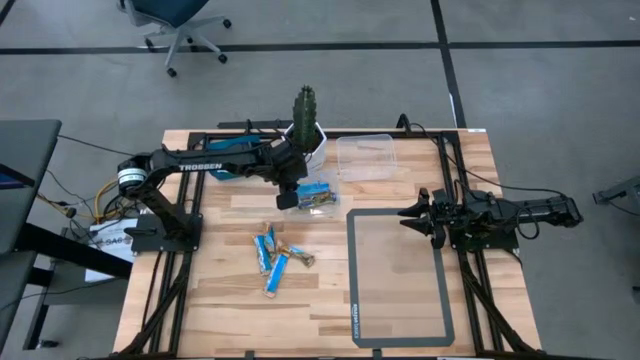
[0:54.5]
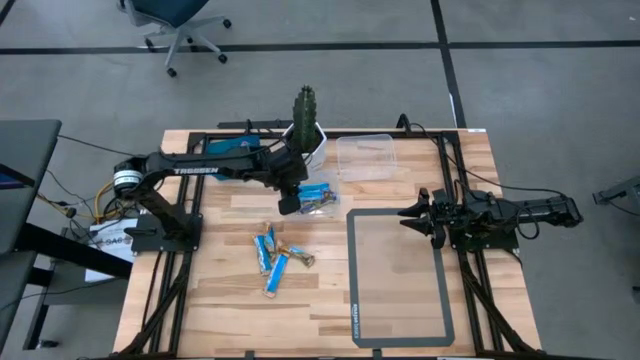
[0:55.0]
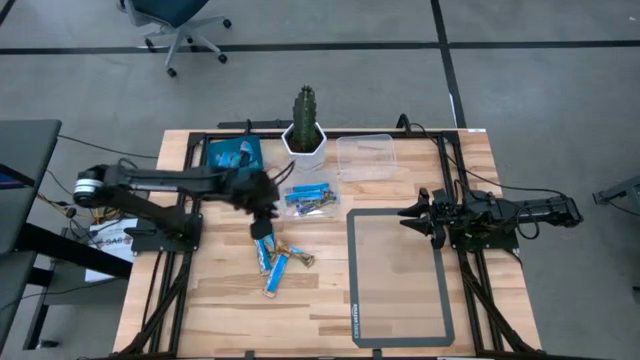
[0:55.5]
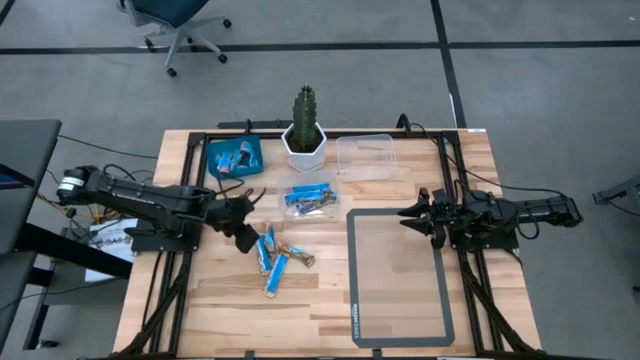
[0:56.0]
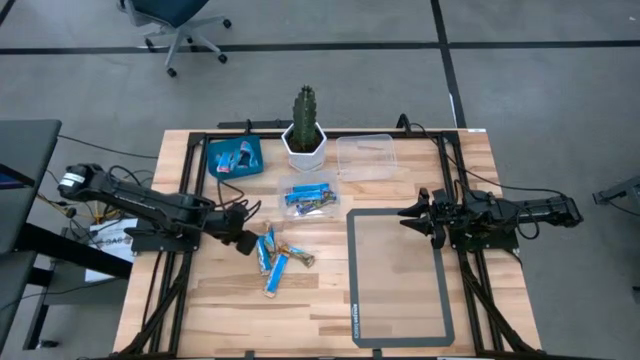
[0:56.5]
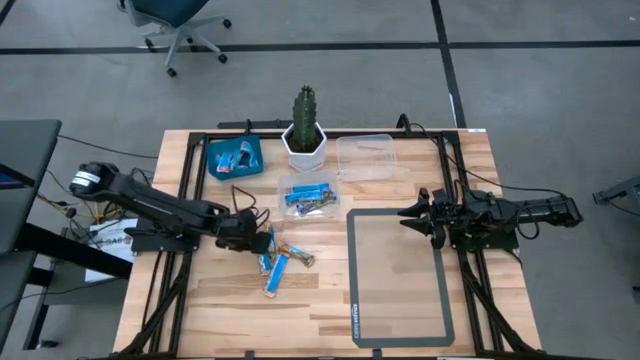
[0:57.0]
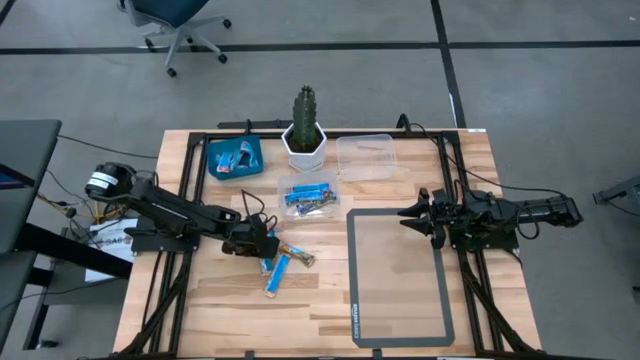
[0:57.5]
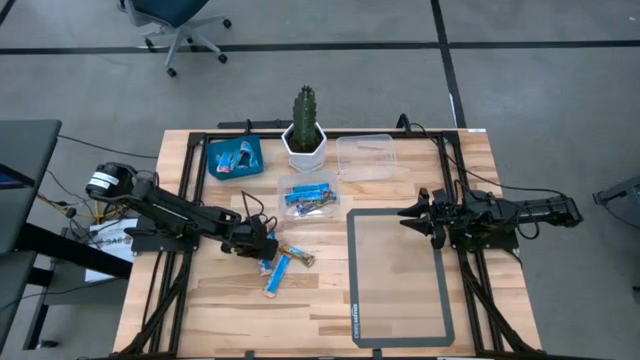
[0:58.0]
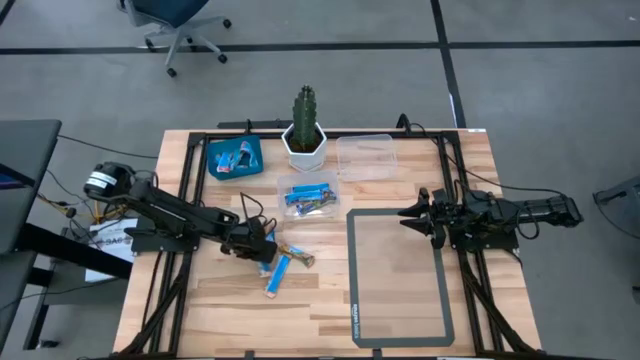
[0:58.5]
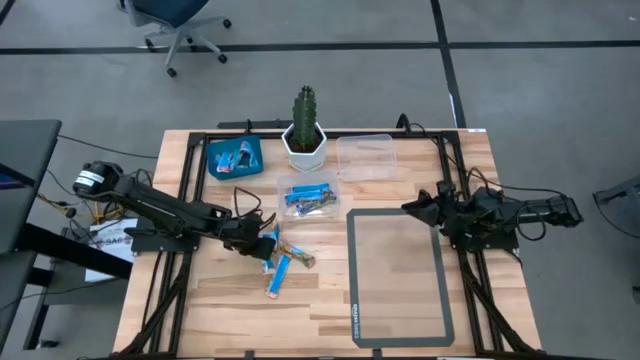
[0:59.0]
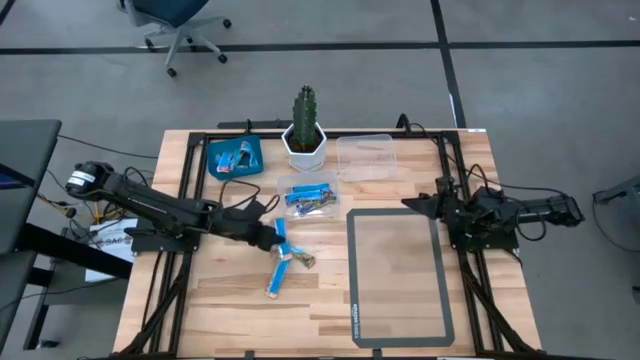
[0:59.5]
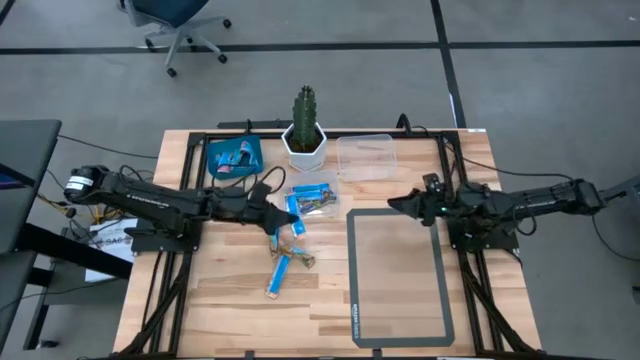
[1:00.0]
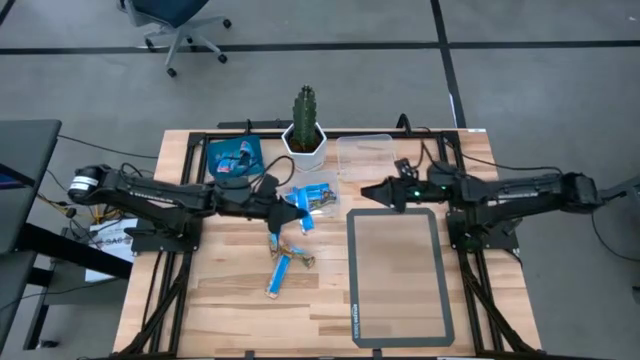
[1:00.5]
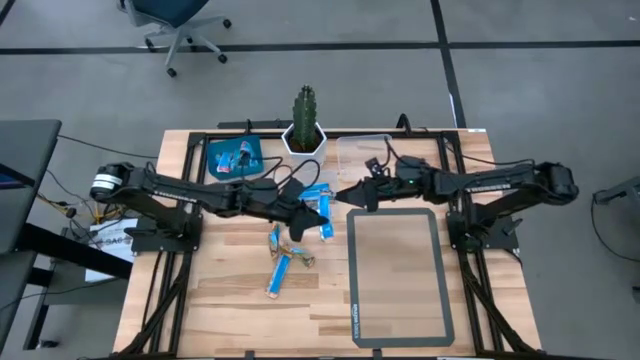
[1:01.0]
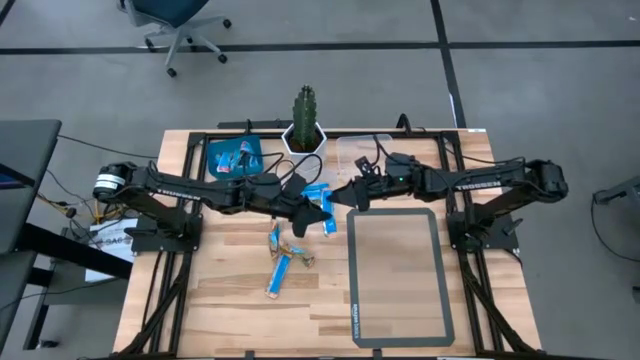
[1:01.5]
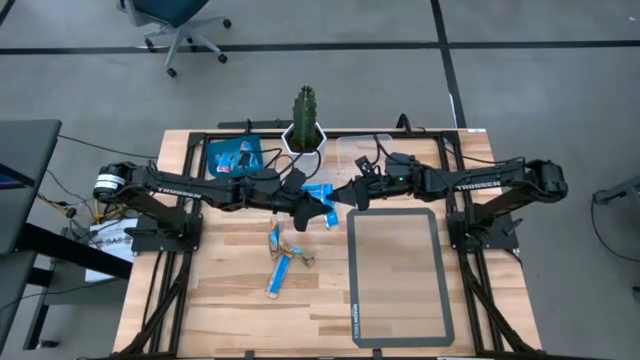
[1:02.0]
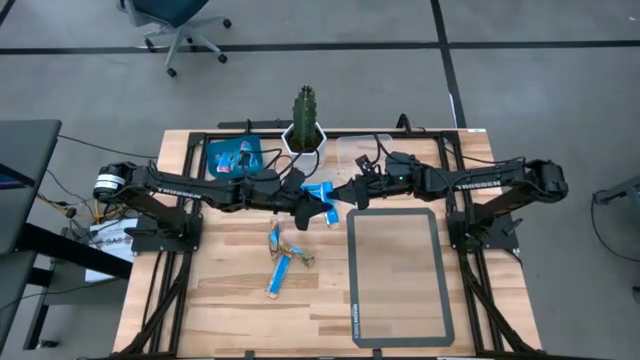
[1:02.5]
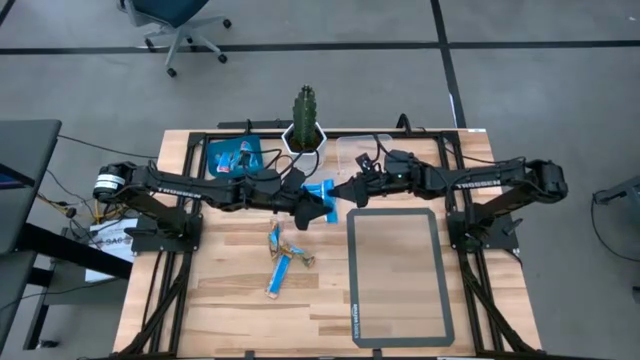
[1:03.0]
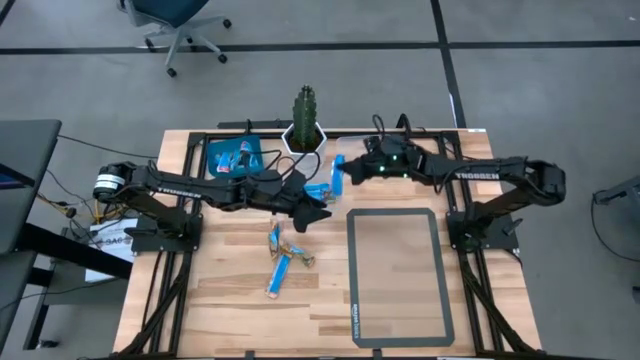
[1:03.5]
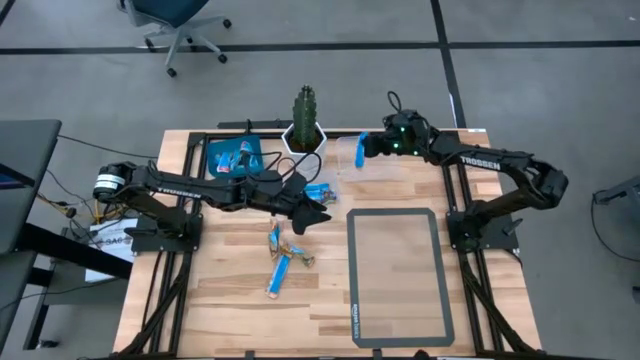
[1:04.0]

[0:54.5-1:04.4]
Task: Pick and place Granola Bars by type
Put the yellow granola bar into the top transparent bin

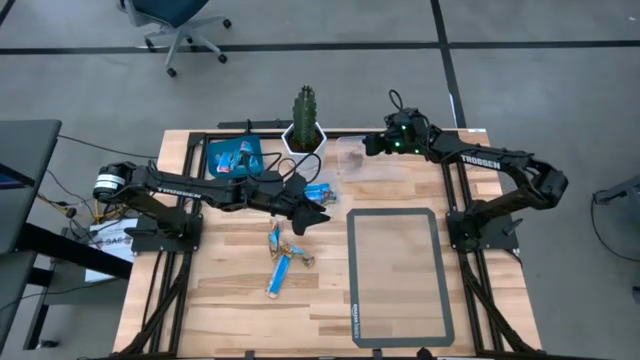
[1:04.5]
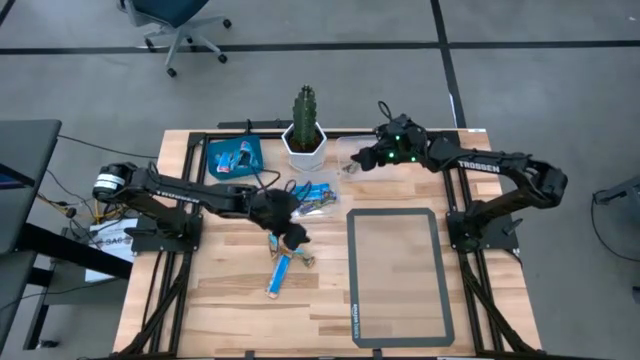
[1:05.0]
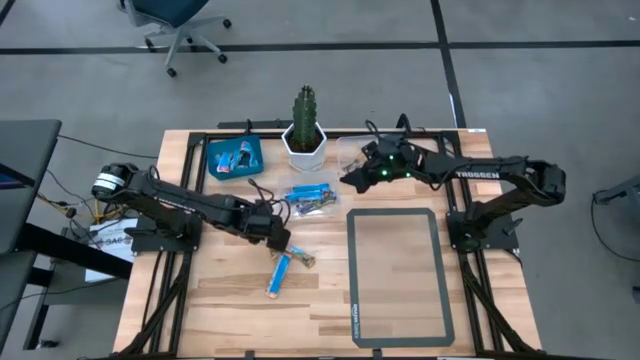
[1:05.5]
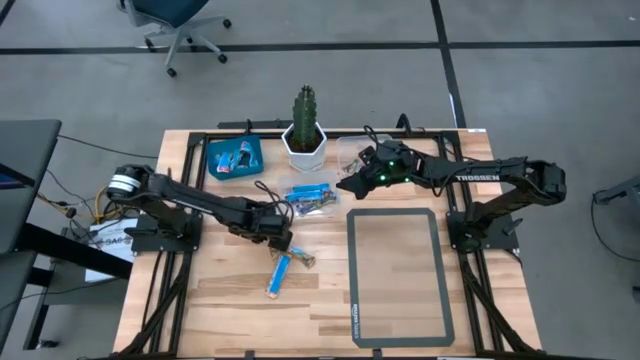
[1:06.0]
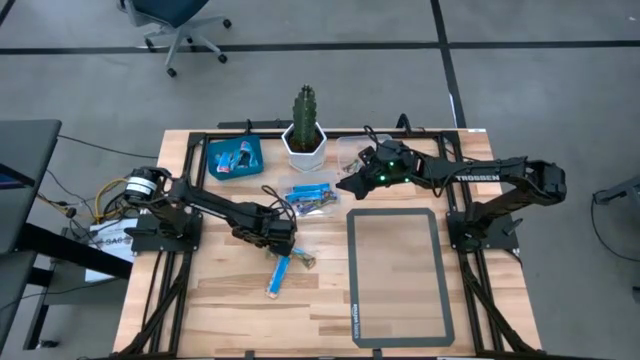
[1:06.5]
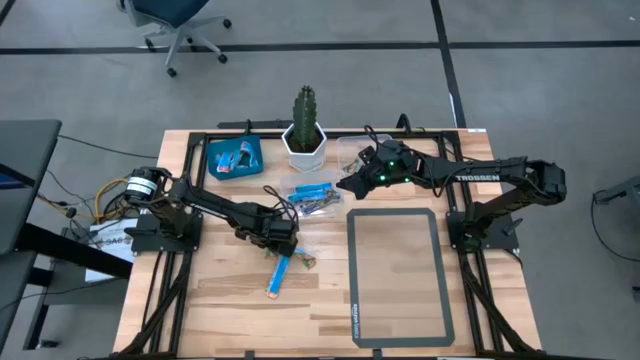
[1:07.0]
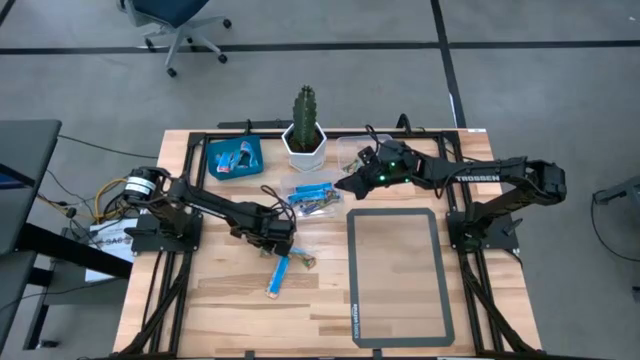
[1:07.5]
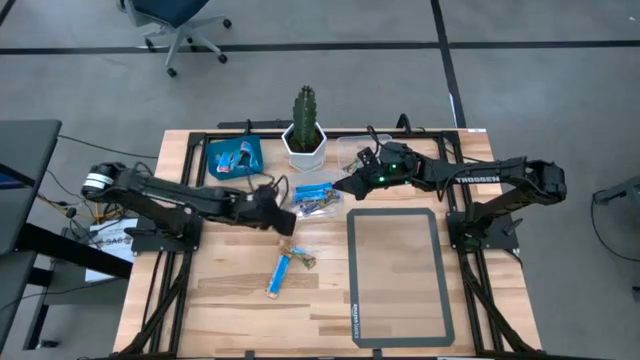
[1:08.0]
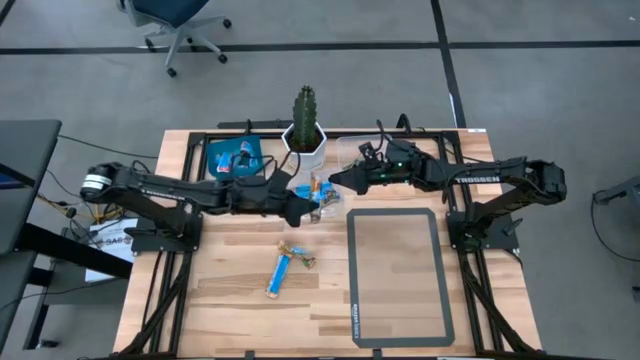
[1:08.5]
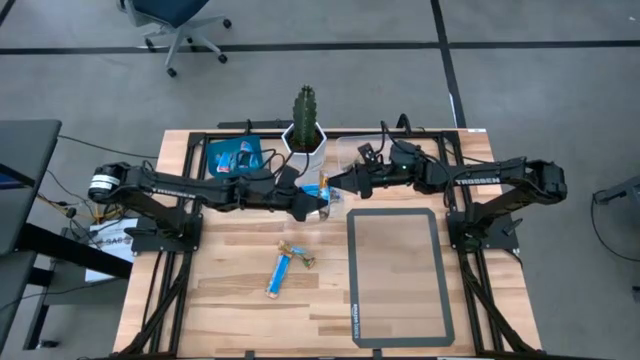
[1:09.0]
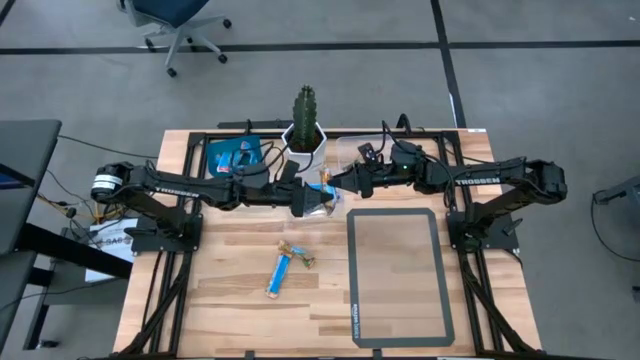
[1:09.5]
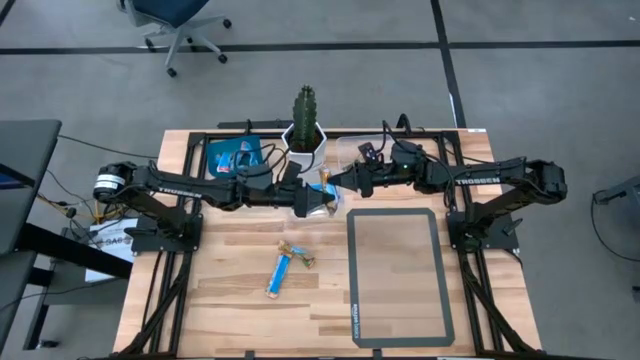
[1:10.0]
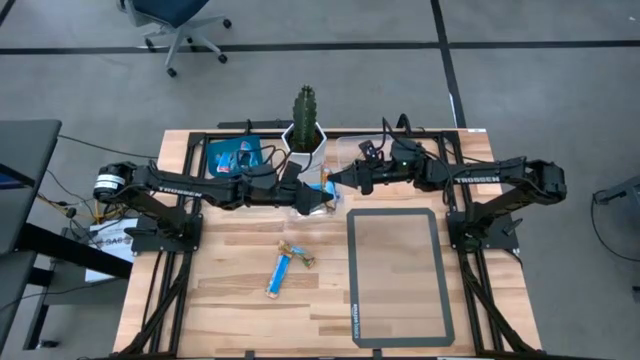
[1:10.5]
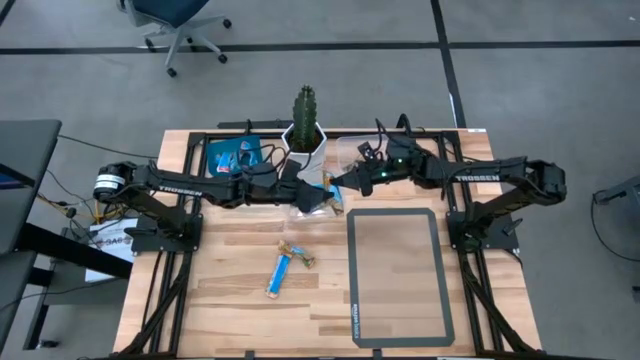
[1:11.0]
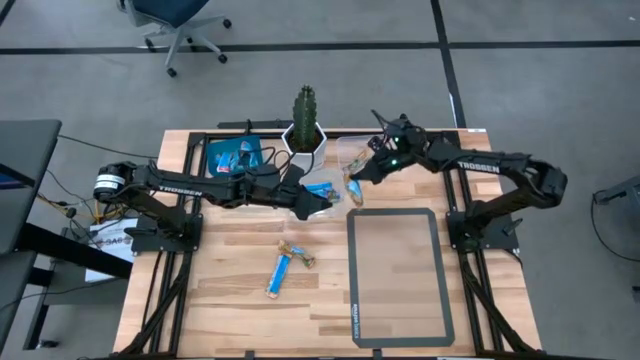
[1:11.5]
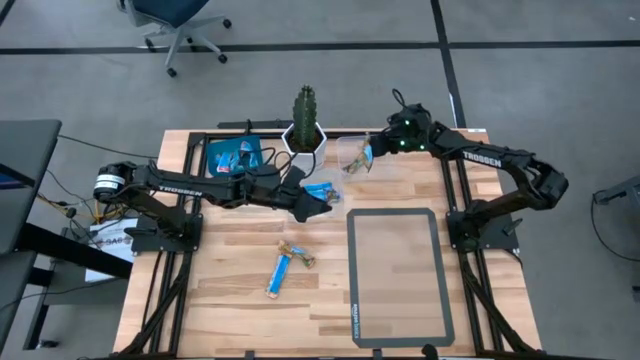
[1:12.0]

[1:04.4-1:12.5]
Put the yellow granola bar into the top transparent bin

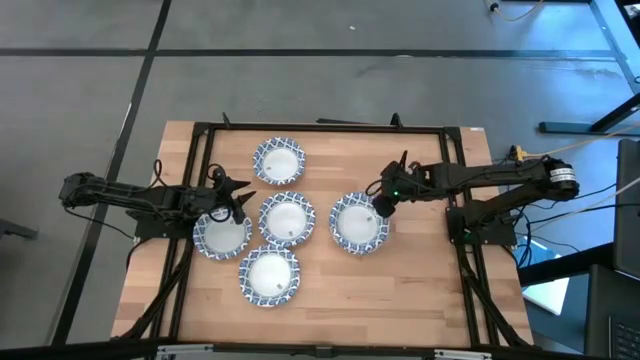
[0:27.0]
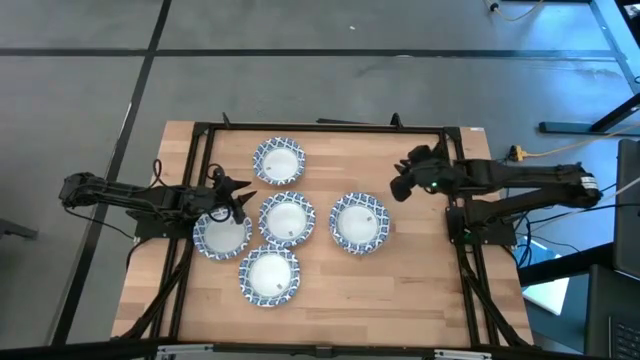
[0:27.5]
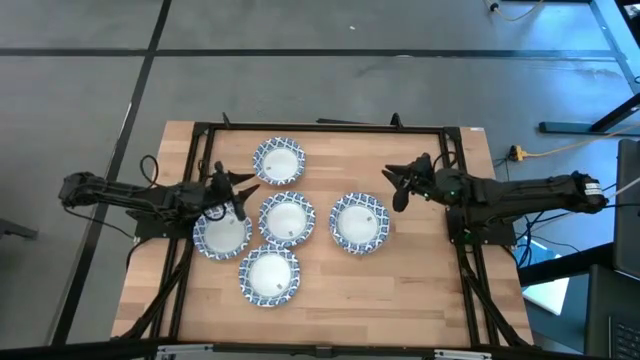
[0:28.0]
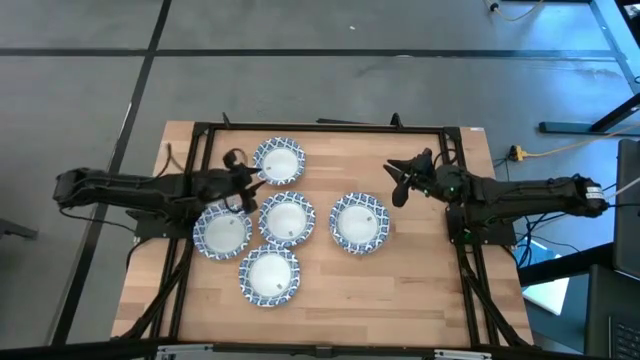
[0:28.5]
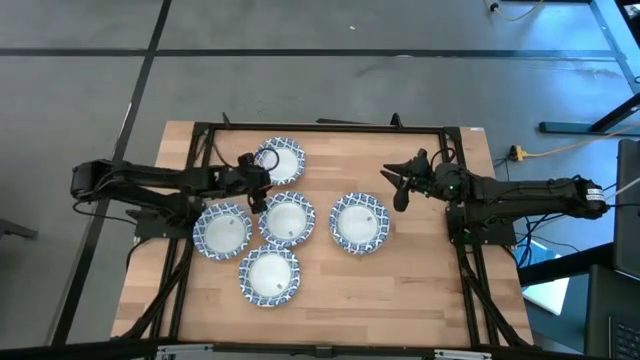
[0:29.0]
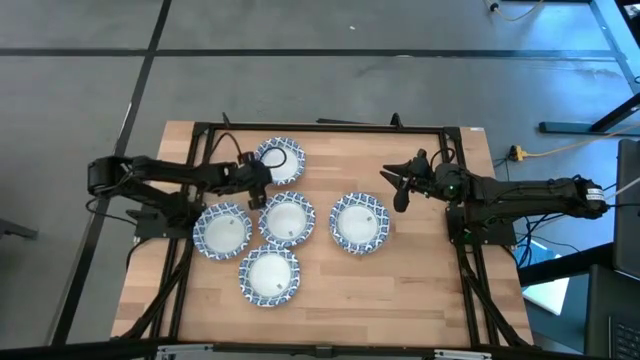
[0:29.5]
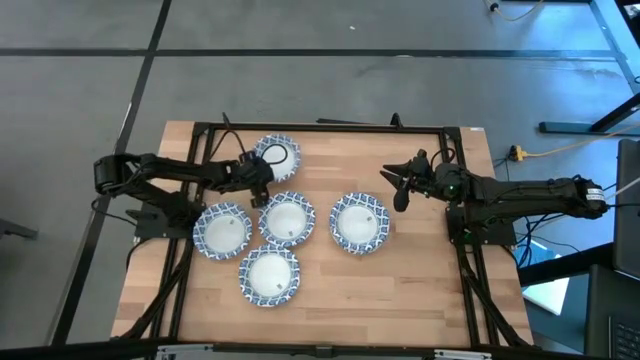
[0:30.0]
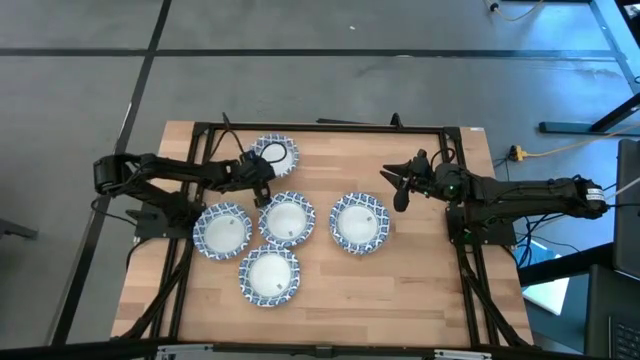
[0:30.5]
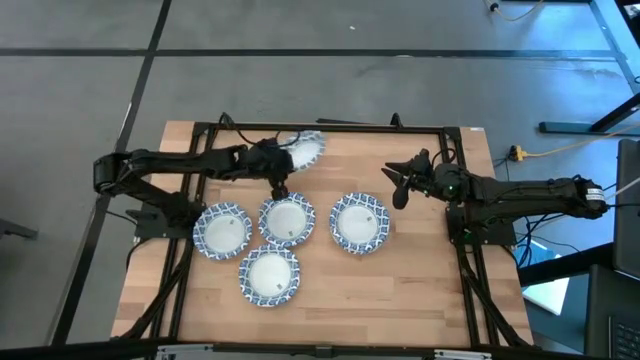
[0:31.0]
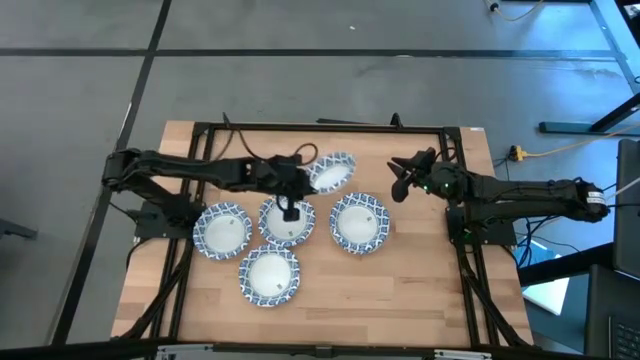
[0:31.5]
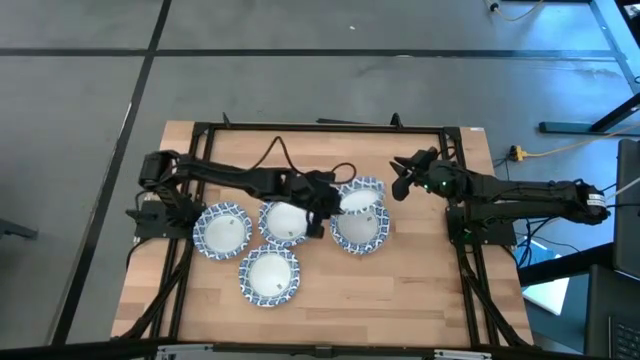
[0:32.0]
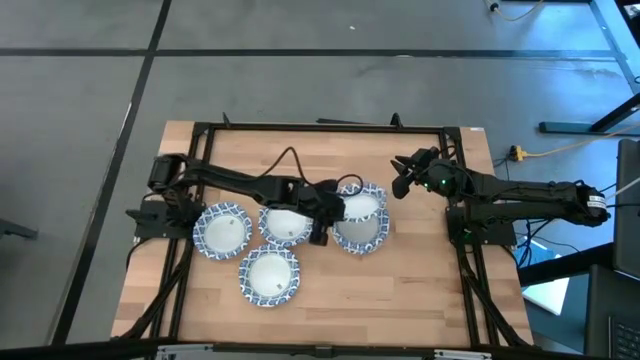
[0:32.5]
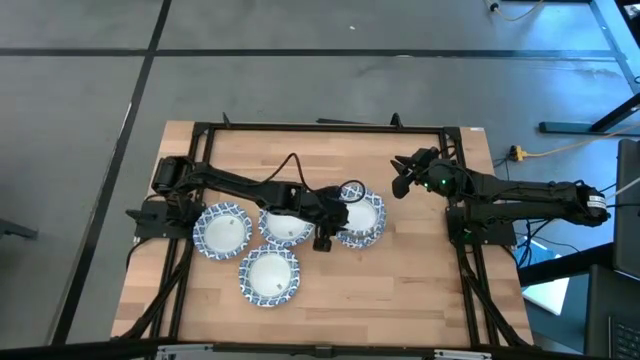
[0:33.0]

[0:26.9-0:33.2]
Task: Nest bowls inside each other
Stack the white patterned bowls on top of the other white patterned bowls
